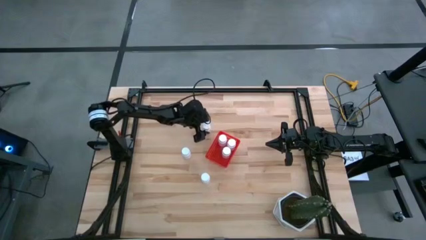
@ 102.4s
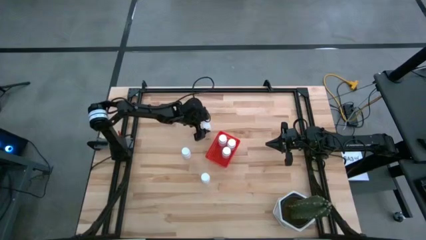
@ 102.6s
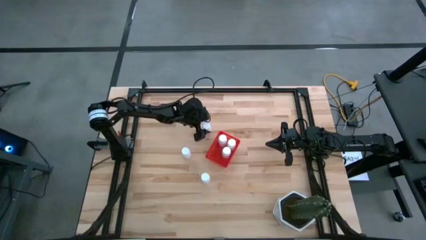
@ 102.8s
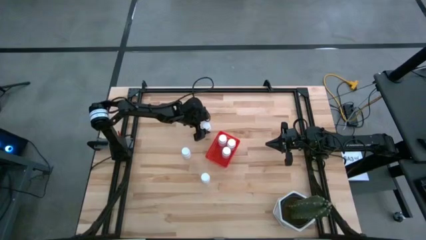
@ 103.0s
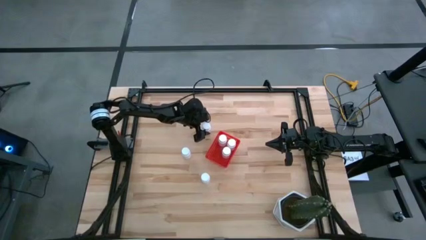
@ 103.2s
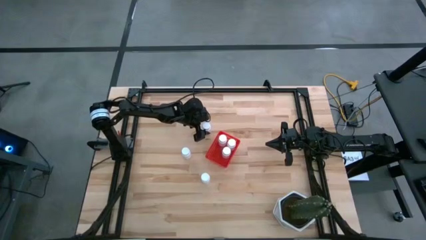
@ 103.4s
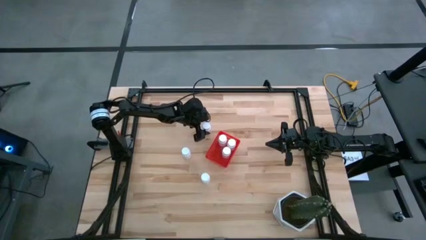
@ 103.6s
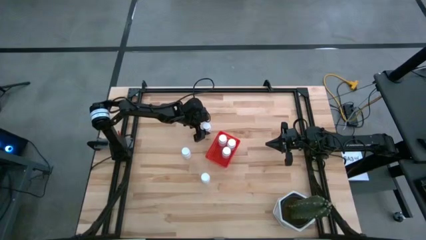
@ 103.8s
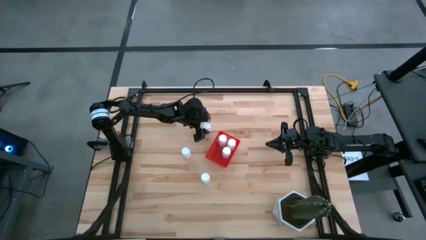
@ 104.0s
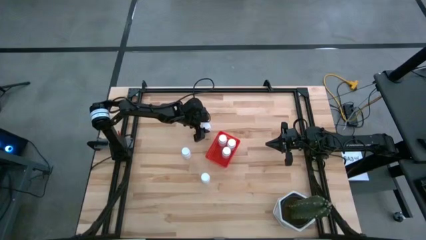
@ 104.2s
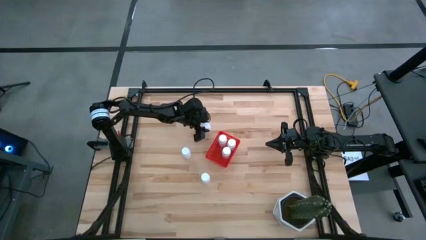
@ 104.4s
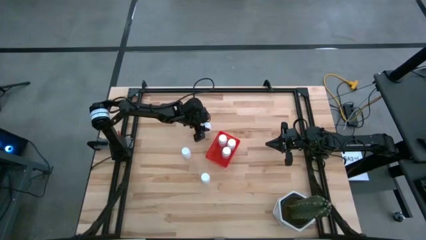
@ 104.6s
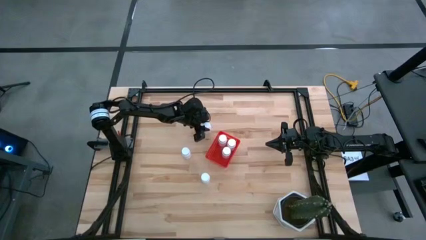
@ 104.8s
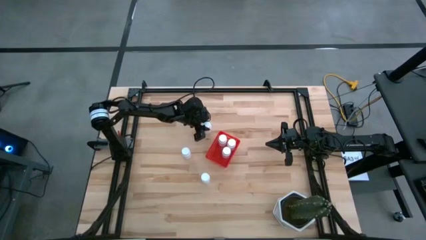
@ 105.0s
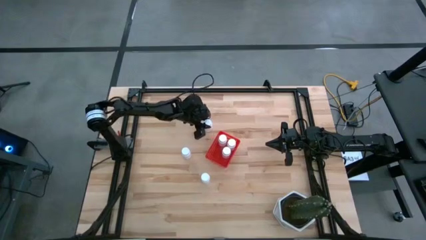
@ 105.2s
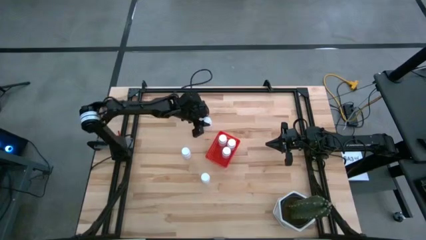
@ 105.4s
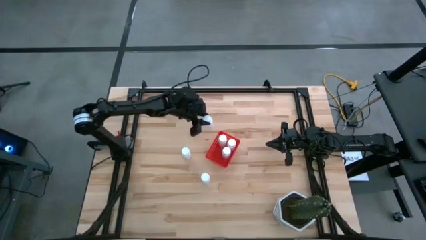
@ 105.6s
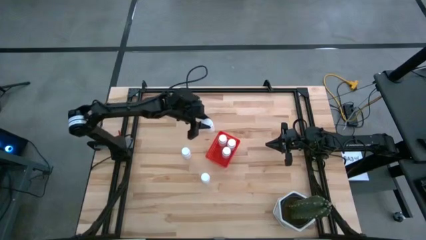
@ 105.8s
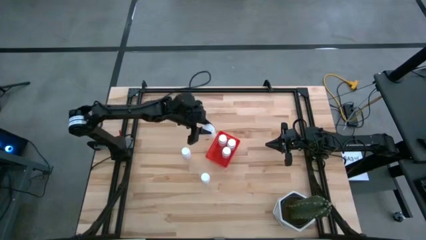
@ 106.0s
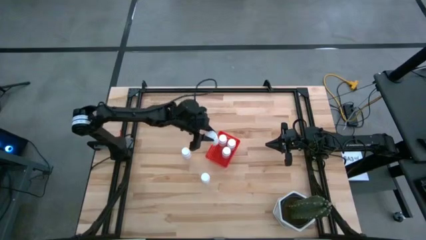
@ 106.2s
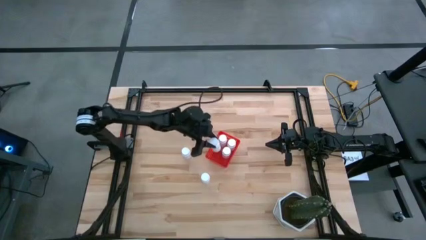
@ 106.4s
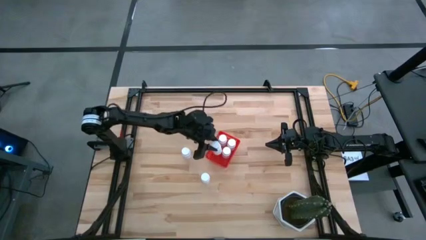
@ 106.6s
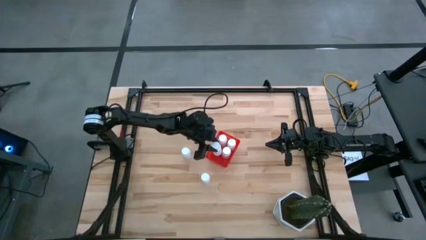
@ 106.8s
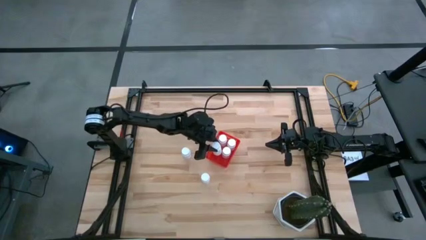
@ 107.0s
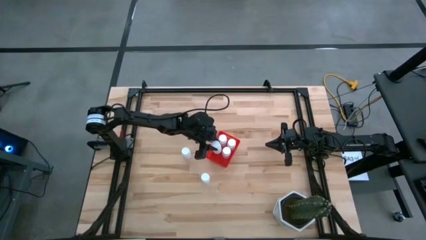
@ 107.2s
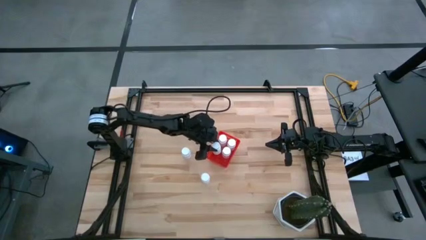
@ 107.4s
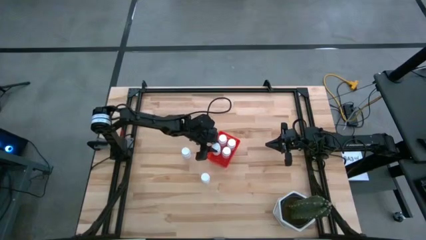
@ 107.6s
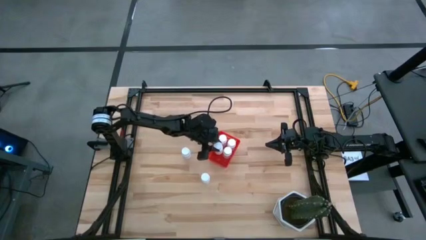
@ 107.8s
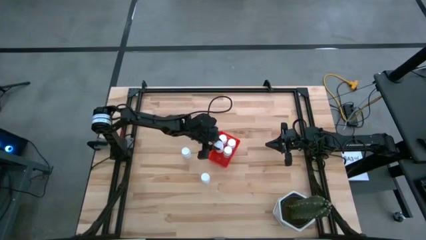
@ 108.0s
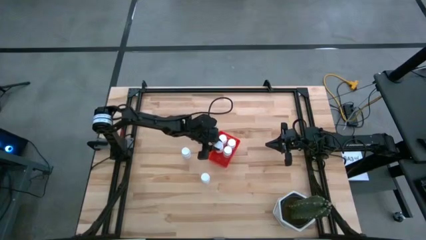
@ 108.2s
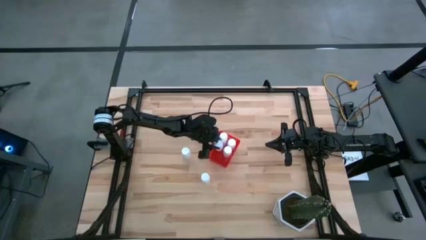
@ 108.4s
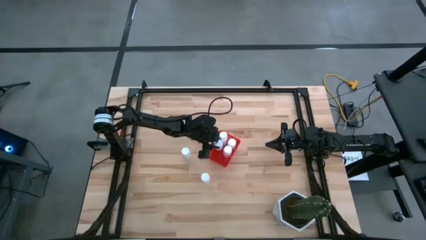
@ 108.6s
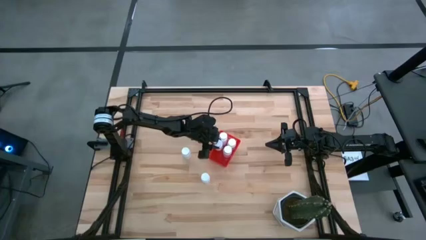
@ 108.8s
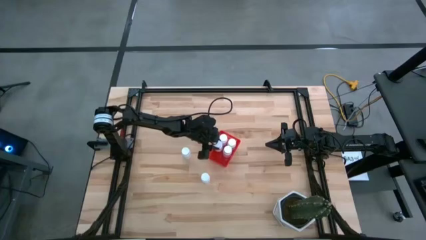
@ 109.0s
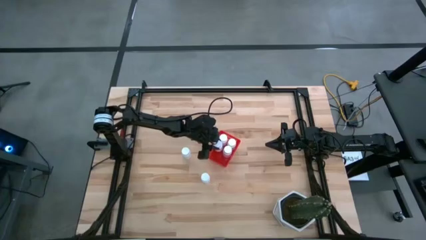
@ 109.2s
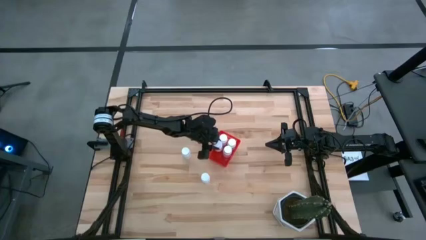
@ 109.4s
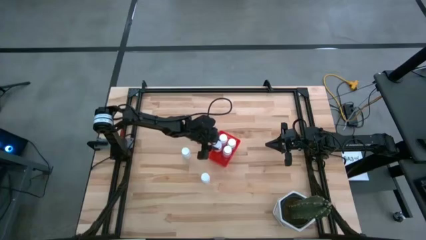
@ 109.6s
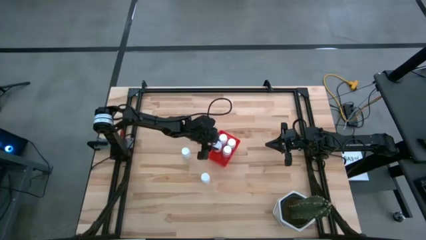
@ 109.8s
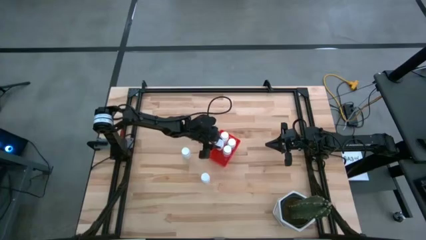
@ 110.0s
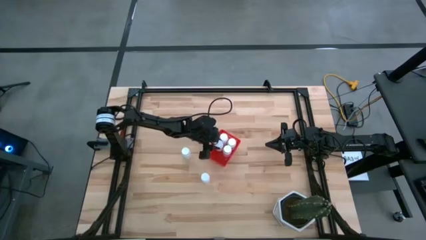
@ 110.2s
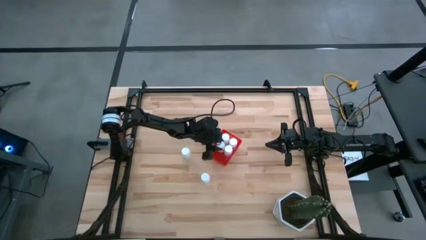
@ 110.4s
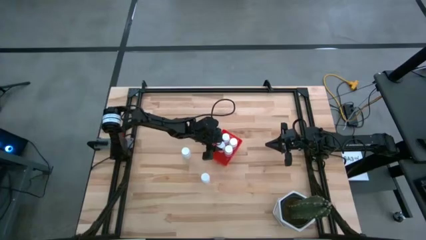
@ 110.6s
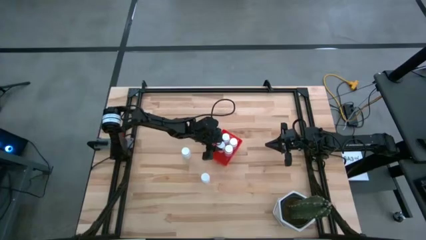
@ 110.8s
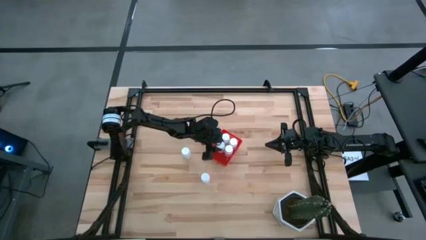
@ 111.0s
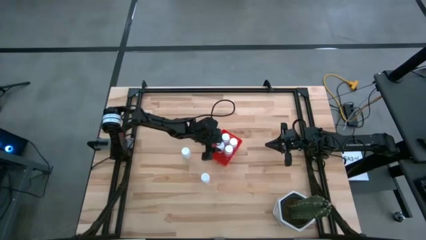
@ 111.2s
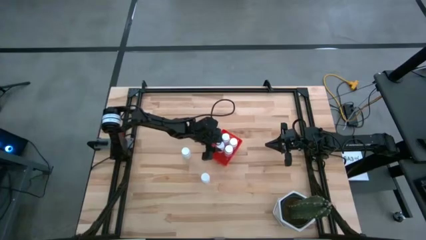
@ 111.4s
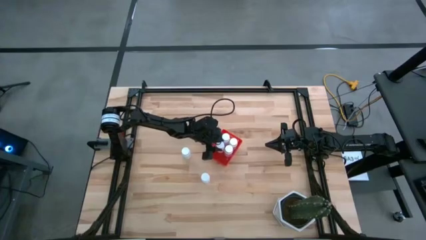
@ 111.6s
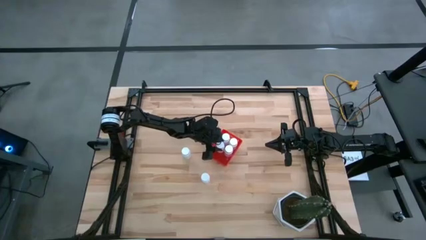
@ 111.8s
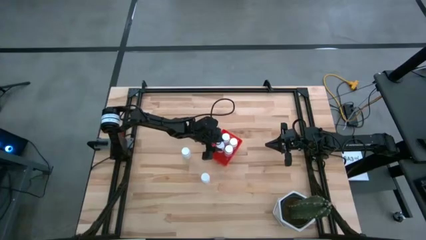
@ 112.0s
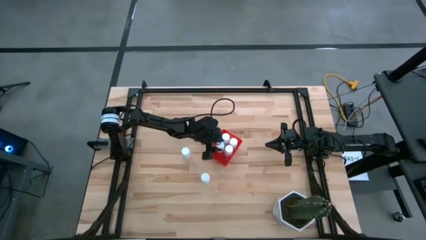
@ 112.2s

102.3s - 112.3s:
Task: Pick and place pill bottles into a basket
Put the top white pill bottle into the red basket

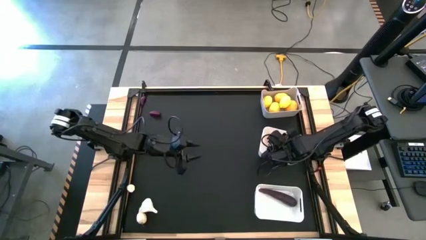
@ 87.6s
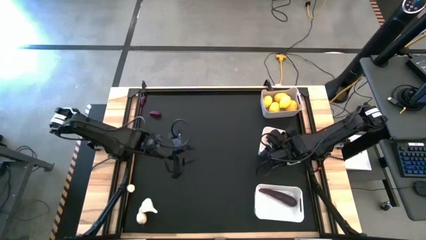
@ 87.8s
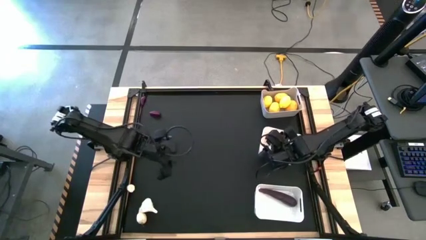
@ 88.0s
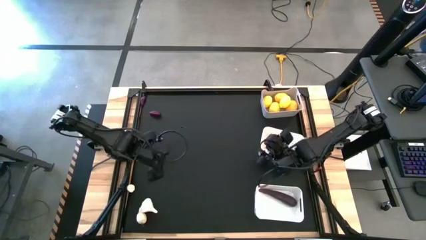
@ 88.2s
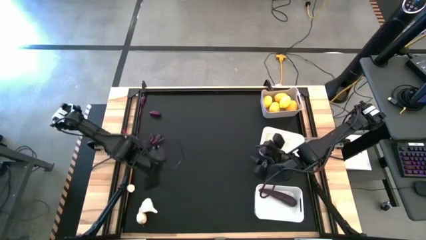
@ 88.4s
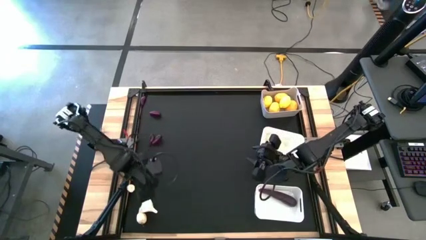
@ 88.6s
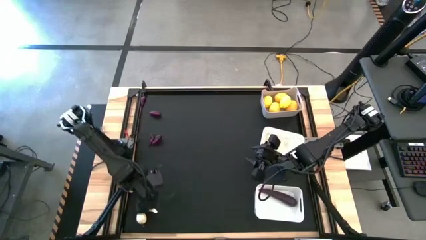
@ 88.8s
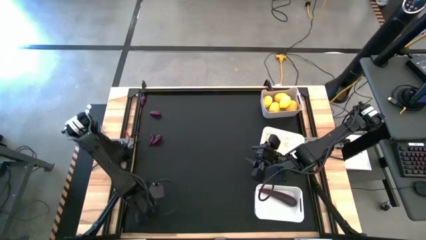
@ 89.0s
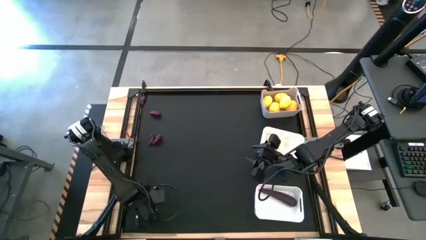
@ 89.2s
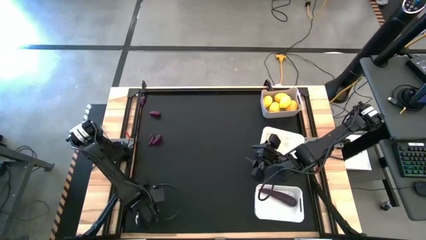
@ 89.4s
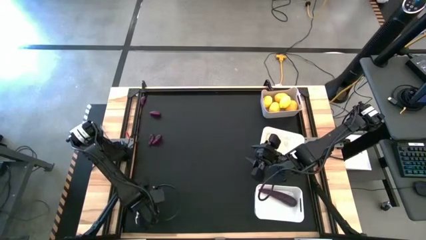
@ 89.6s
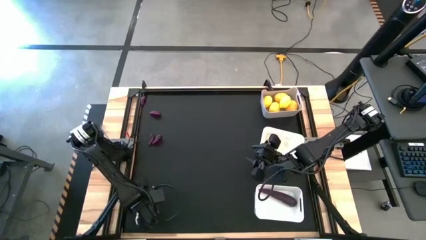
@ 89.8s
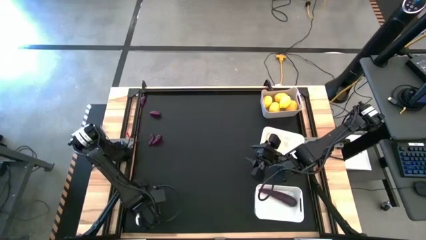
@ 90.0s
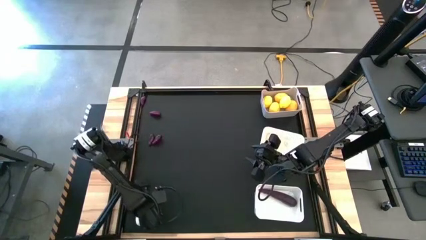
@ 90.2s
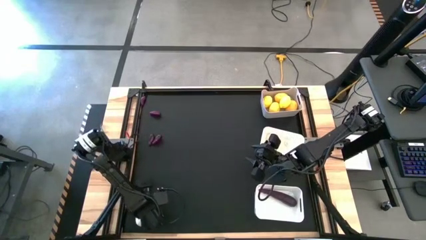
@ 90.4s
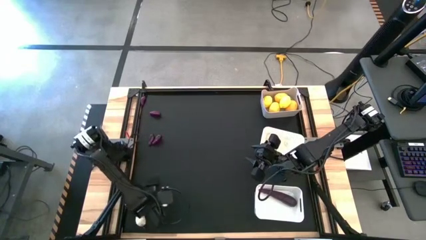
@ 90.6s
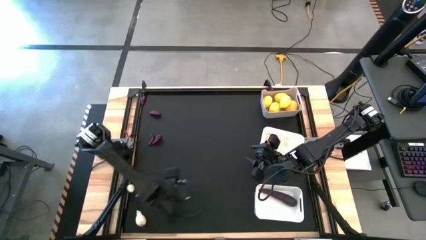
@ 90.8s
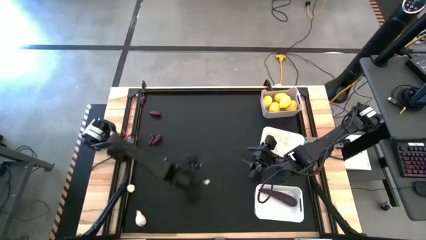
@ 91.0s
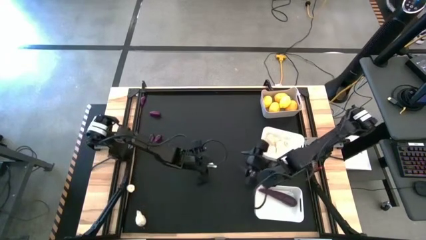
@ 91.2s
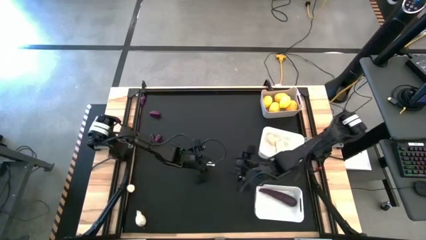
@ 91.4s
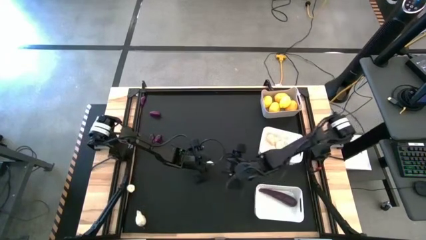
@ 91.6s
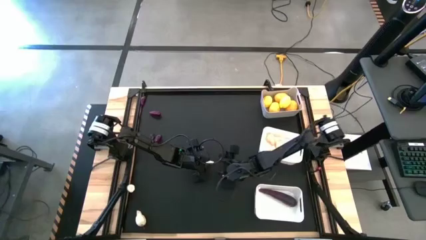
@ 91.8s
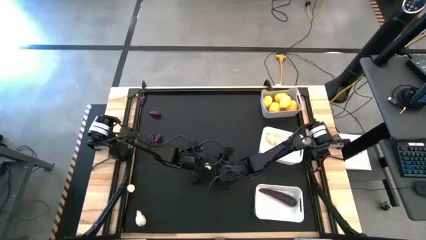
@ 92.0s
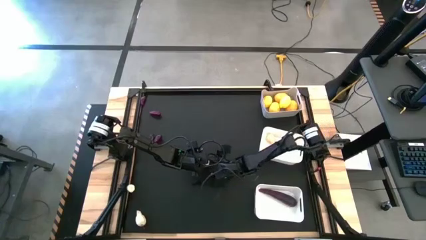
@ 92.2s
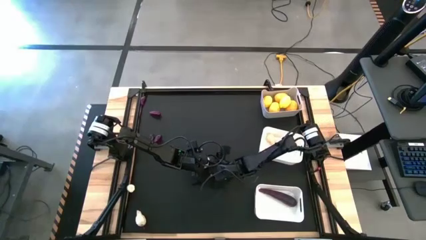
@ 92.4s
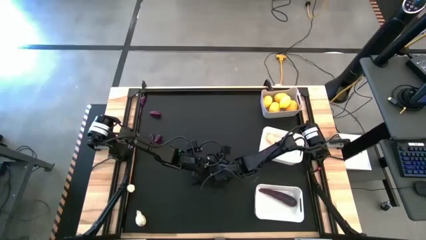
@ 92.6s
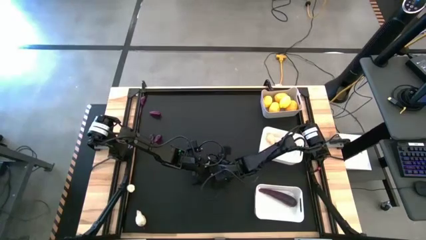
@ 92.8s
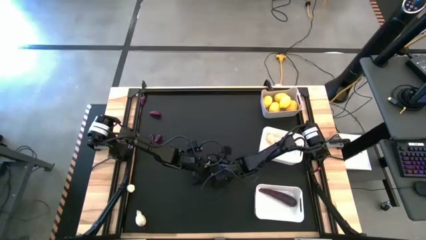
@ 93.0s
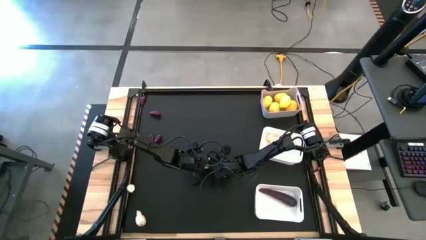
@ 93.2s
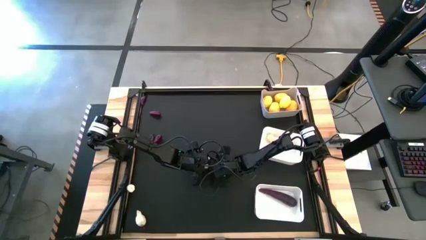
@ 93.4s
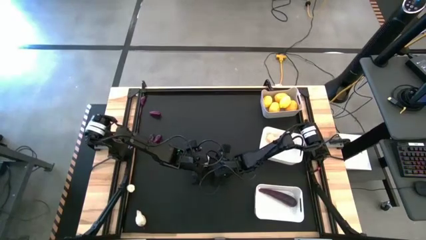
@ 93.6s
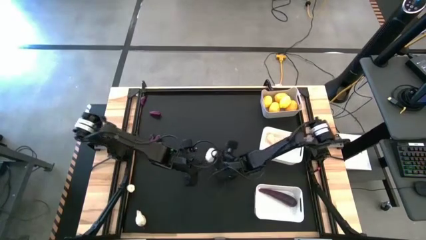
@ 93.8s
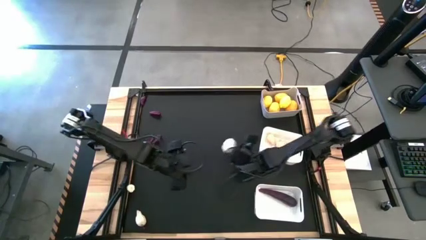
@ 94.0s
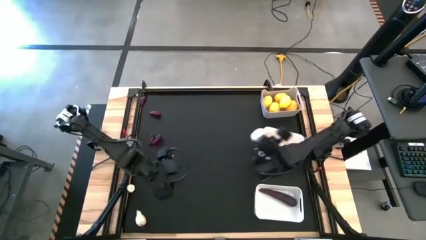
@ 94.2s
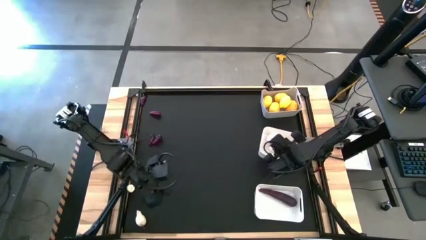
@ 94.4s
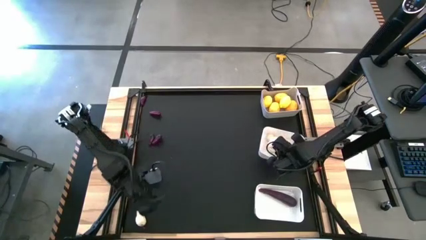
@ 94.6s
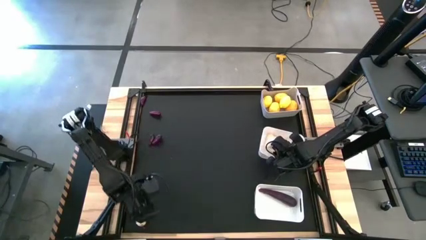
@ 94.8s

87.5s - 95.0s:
Task: Sort produce into baskets
Put the garlic into the top white bin
